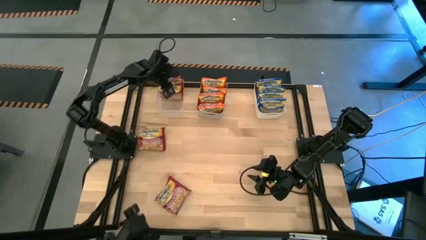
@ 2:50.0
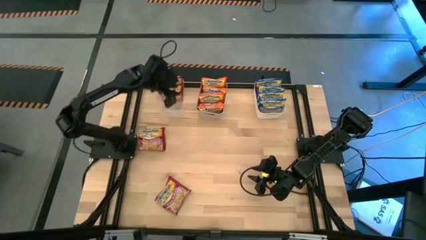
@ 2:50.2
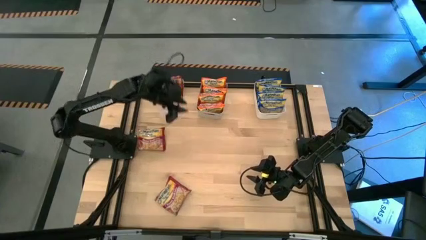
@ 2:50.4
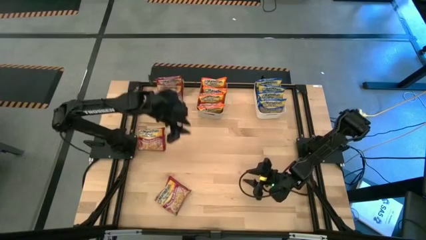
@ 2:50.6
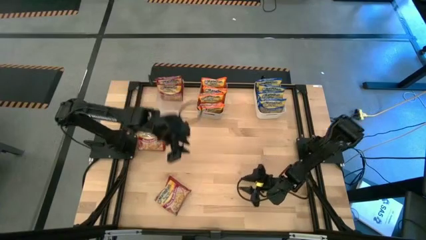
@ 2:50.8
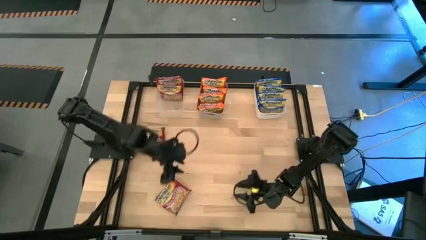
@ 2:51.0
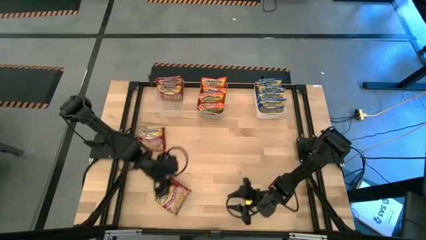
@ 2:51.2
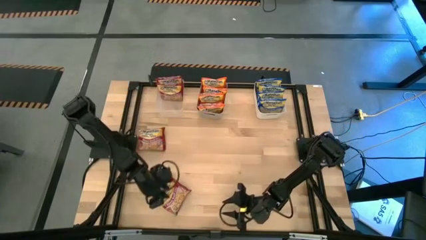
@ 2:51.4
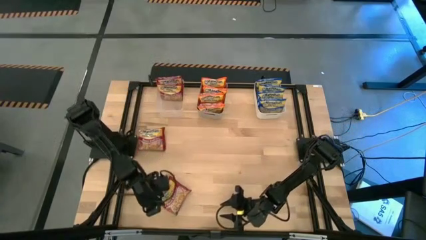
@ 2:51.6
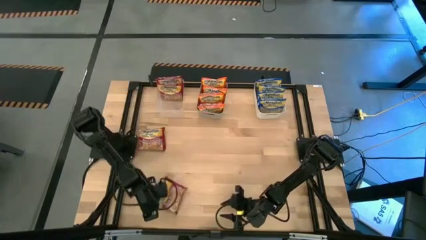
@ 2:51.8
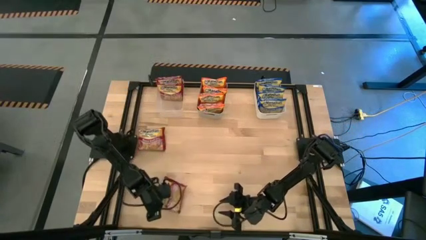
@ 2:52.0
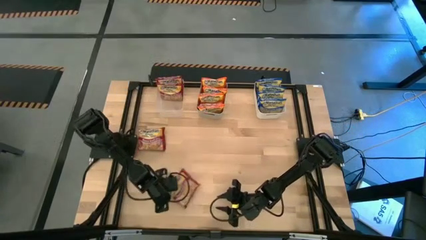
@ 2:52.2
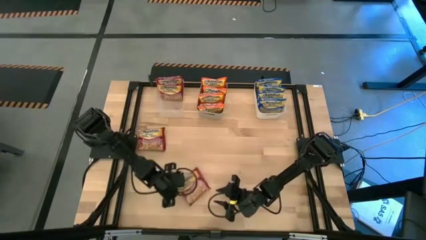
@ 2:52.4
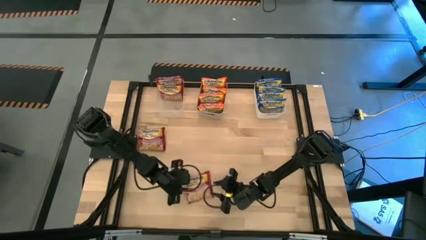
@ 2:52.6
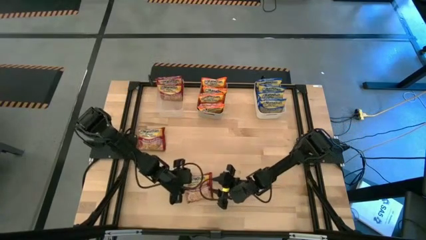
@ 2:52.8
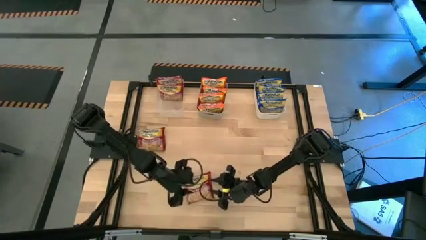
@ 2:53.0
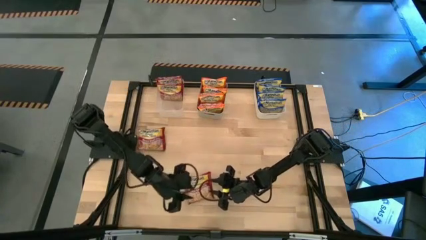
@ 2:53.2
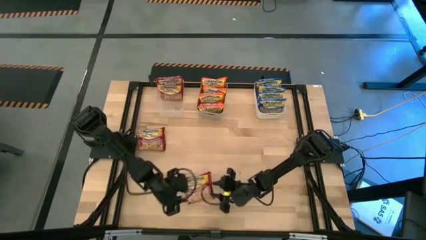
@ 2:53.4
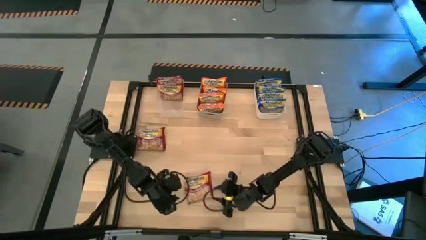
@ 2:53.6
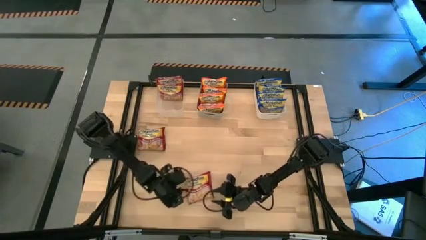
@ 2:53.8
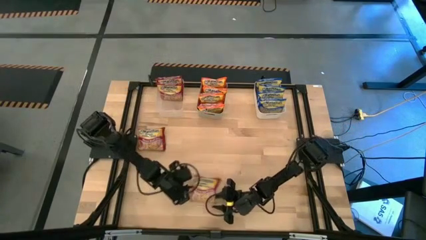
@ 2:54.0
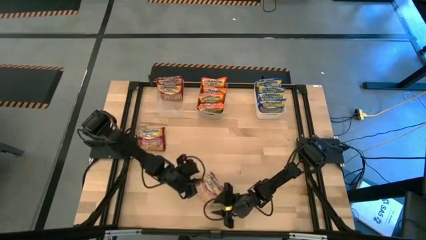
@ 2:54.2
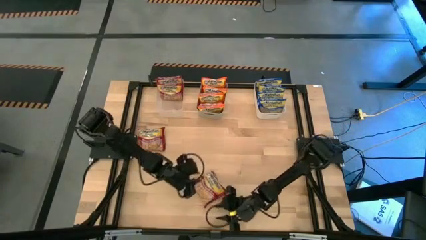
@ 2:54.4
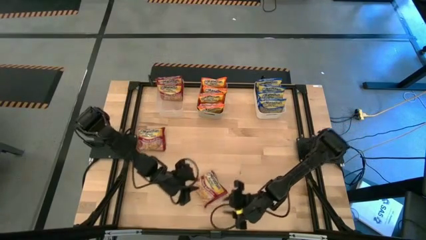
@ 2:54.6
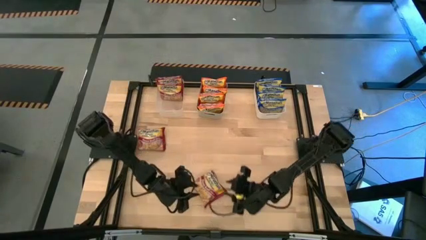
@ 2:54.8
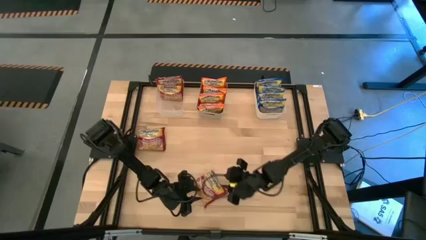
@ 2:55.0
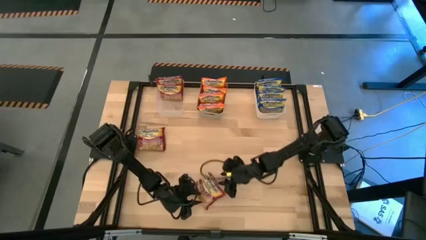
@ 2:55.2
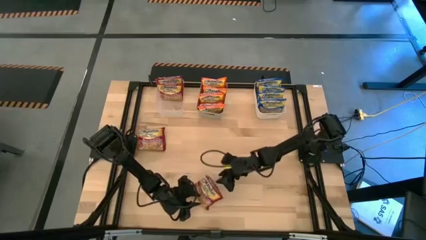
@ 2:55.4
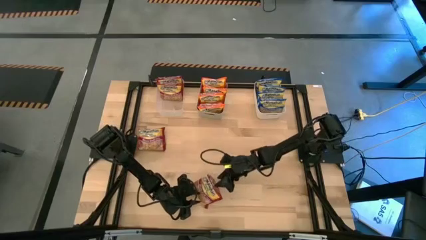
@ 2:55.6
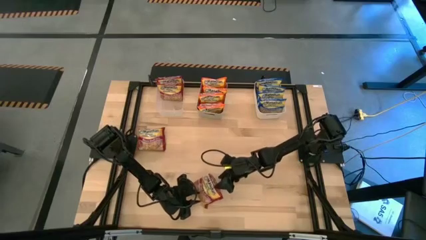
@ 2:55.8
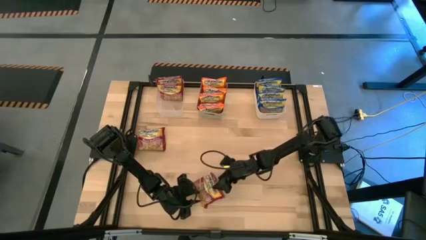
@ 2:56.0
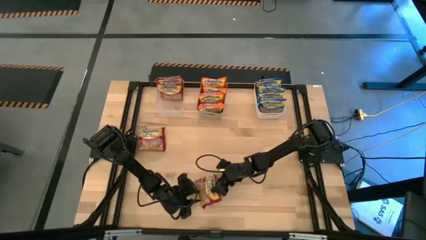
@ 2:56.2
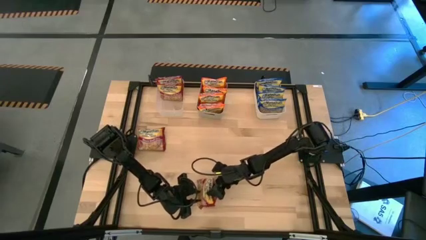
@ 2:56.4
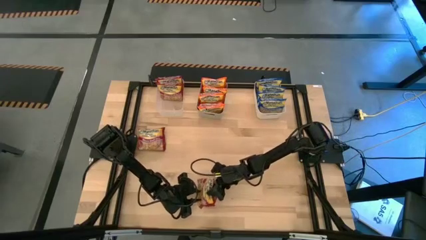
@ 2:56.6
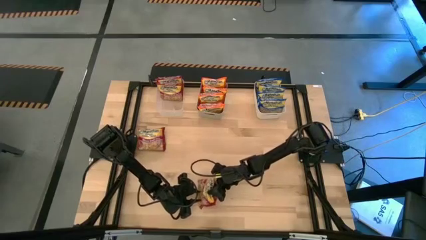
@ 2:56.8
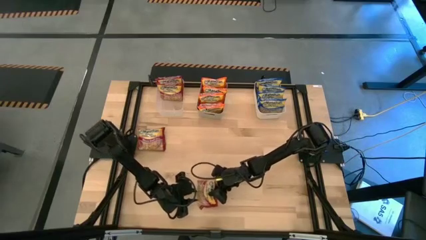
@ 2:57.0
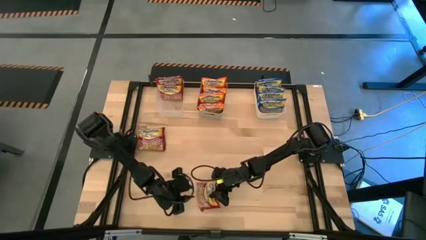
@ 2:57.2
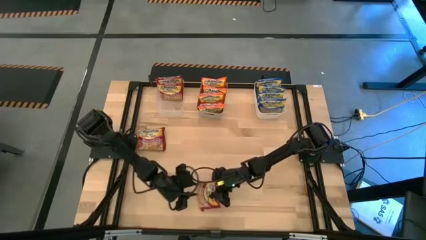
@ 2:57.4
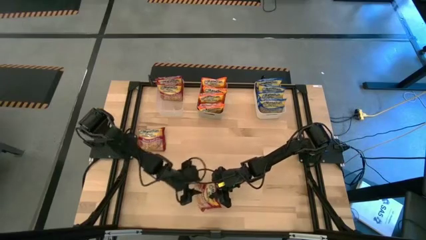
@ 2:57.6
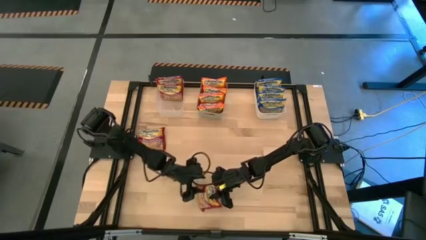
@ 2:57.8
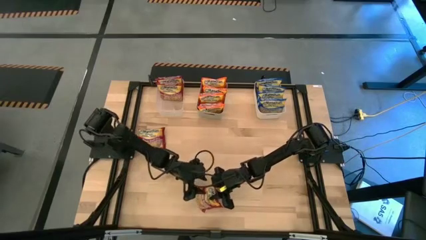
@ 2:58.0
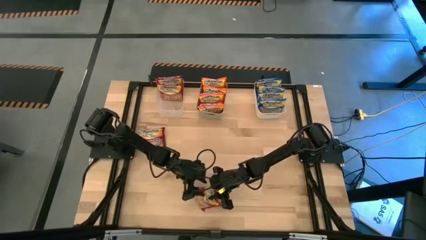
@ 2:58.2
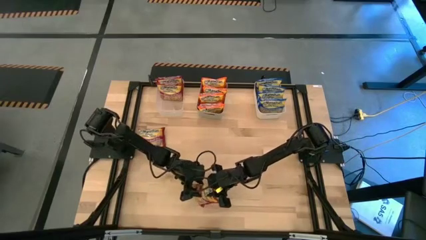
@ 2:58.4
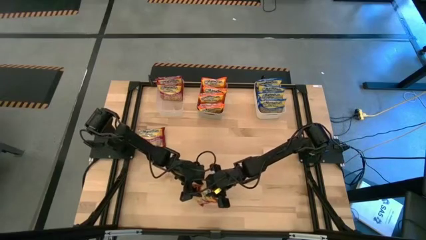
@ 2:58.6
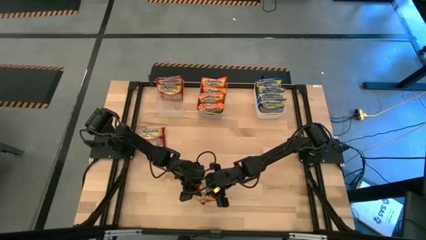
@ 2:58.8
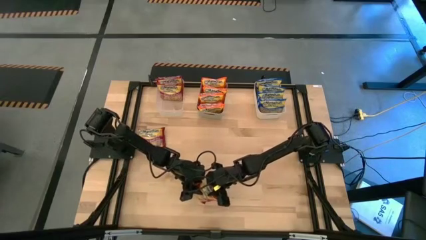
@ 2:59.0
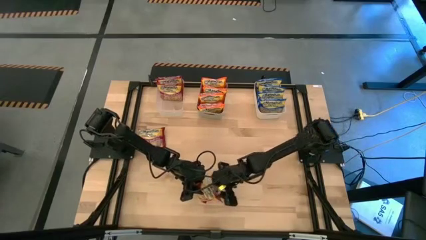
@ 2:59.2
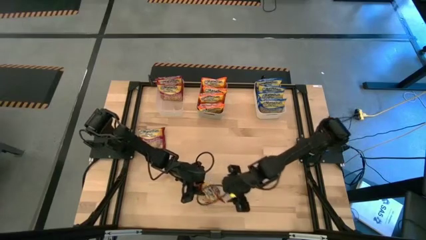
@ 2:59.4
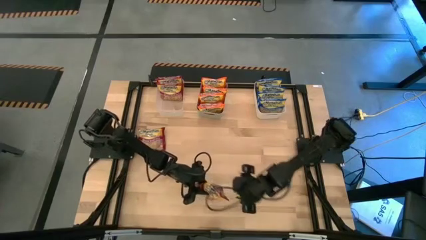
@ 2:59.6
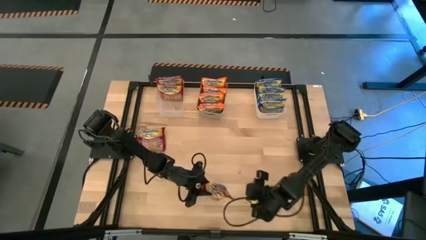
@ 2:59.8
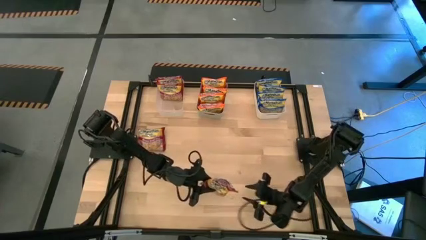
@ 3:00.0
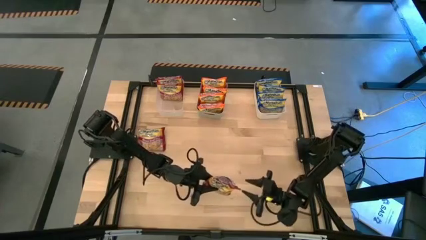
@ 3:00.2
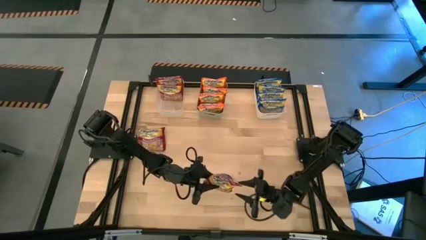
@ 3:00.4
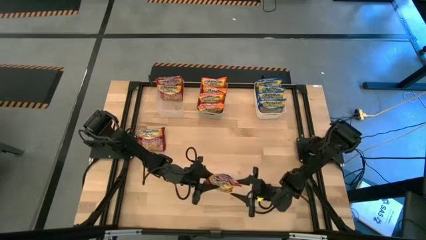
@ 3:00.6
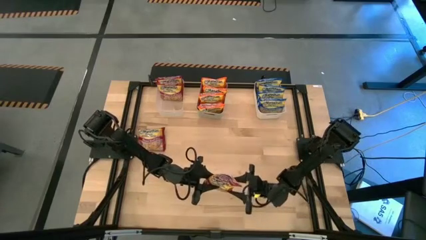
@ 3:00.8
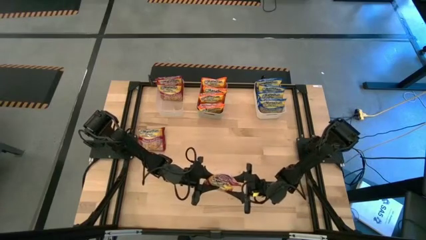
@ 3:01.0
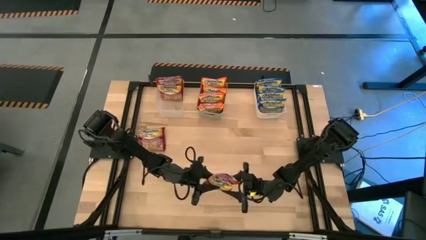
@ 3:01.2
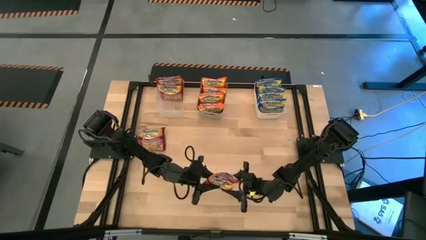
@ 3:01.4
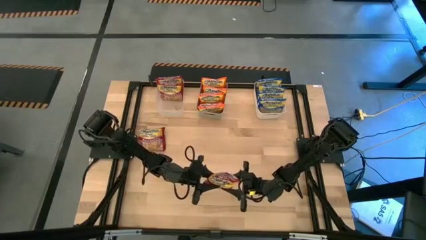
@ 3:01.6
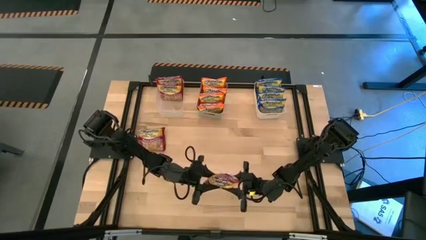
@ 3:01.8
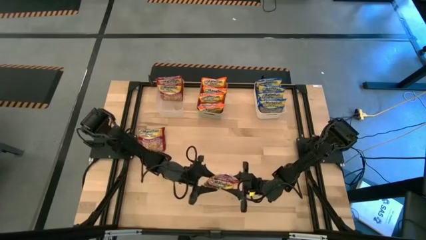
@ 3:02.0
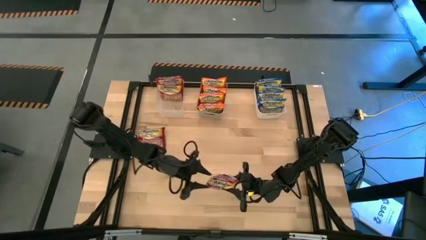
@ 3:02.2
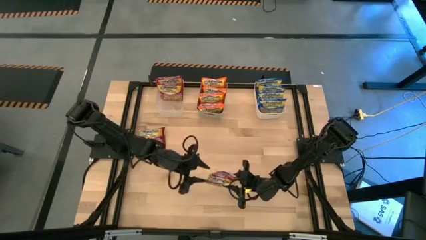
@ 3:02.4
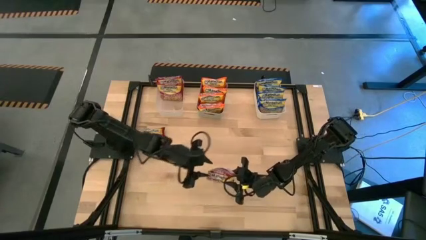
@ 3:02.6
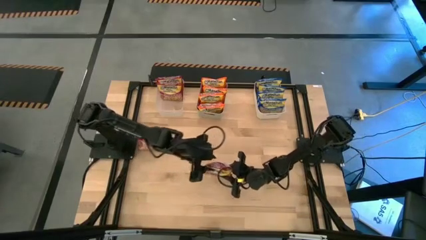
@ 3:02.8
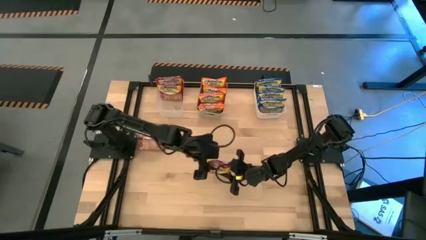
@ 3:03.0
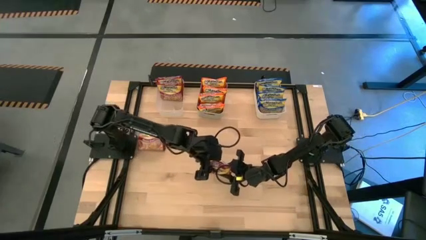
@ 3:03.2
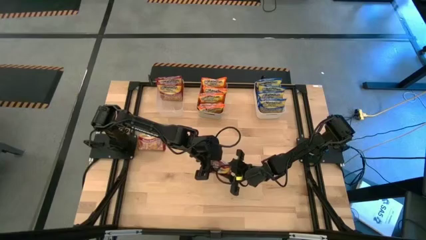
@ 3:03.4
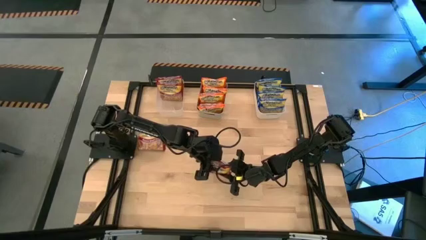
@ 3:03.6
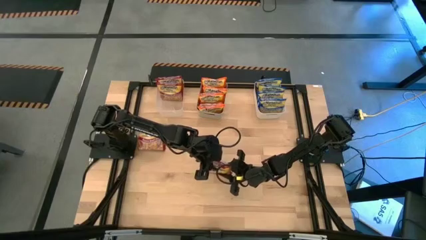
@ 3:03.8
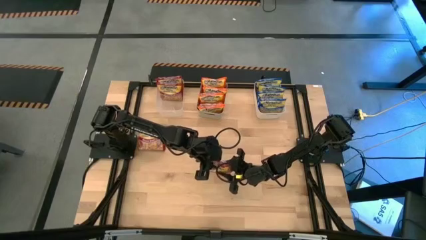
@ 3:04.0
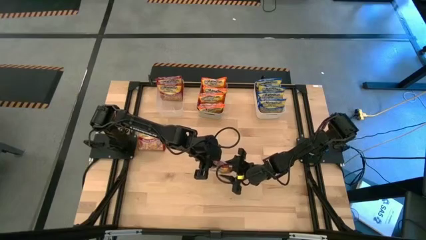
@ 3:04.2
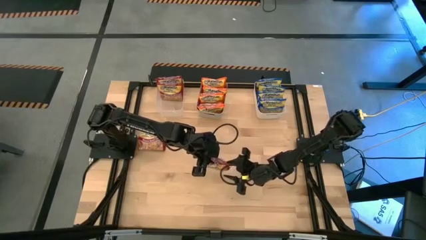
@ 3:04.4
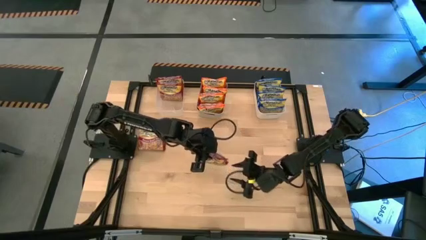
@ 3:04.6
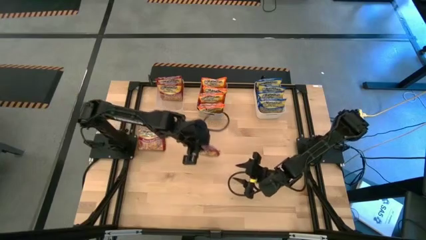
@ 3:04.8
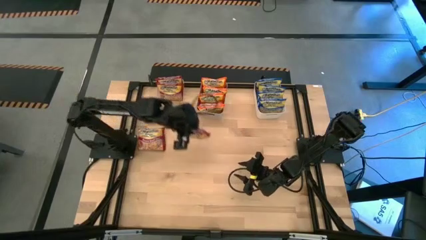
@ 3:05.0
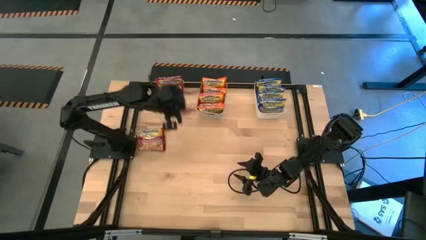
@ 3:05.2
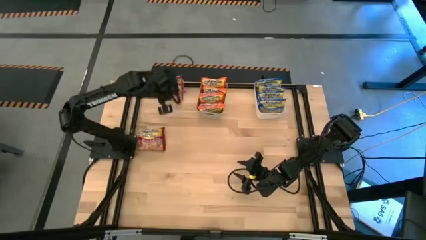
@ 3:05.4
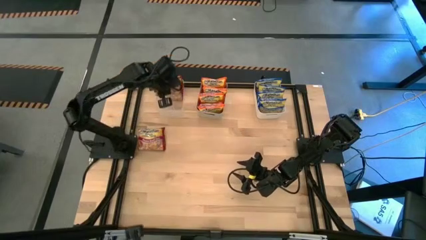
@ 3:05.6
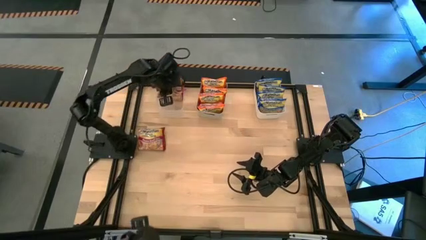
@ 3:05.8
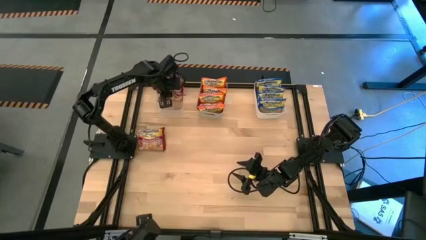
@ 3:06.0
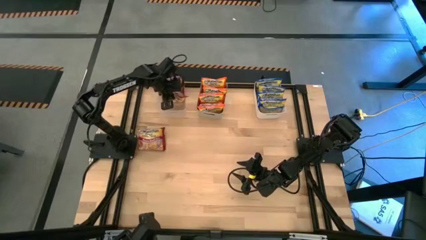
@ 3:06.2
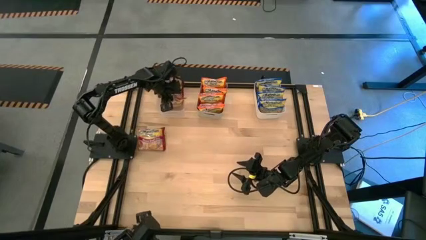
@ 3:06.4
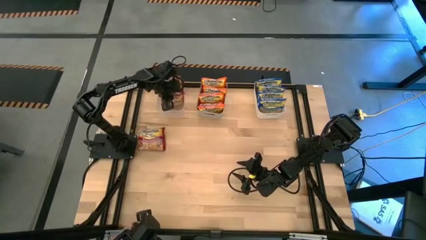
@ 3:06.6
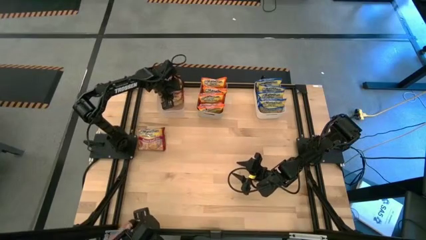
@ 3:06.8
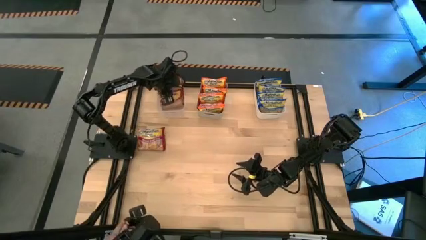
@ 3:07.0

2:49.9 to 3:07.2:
Task: Sort Maruchan noodles
Put the red noodle pack into the transparent bin
